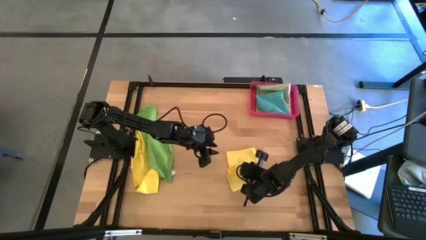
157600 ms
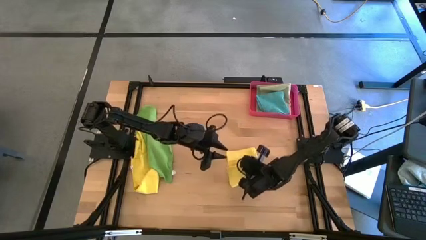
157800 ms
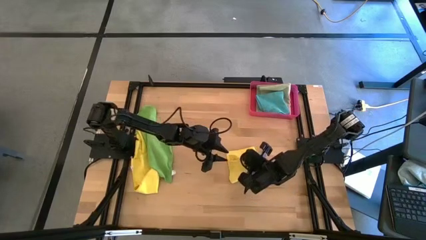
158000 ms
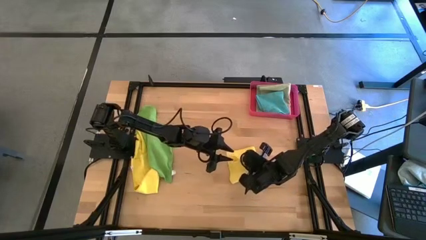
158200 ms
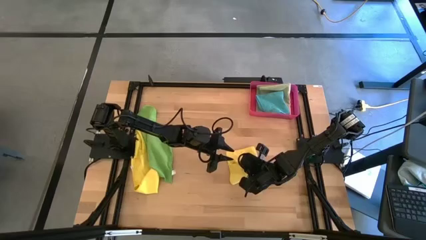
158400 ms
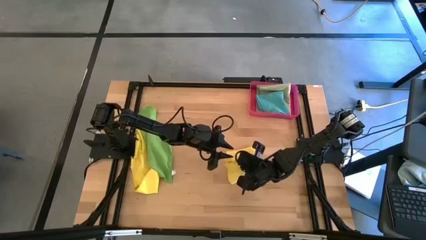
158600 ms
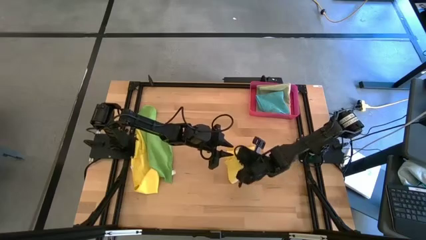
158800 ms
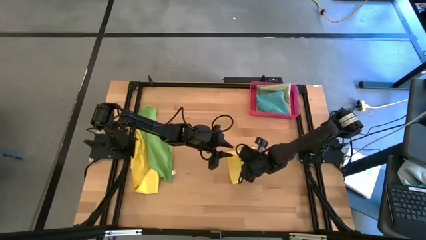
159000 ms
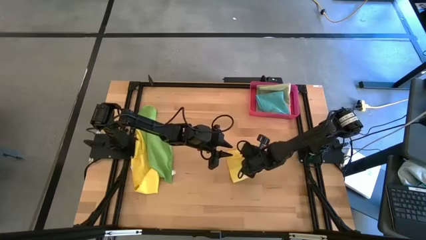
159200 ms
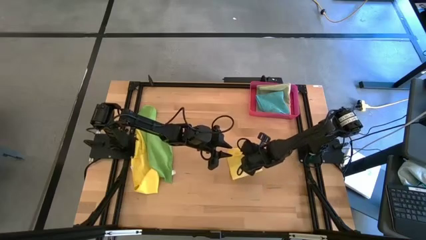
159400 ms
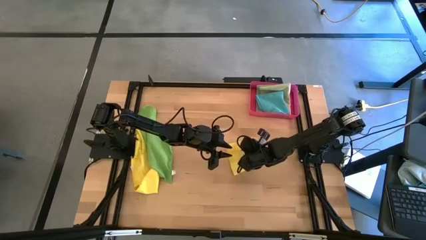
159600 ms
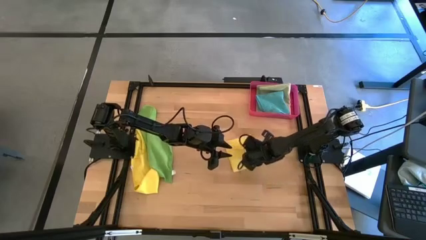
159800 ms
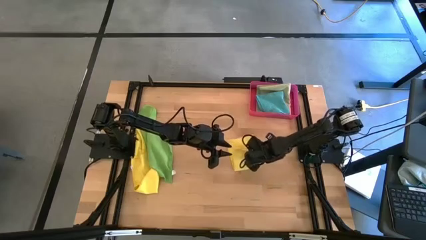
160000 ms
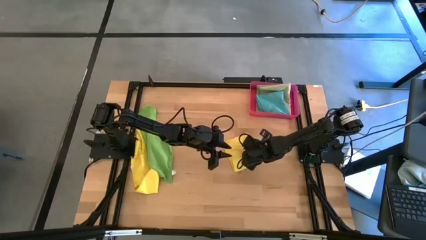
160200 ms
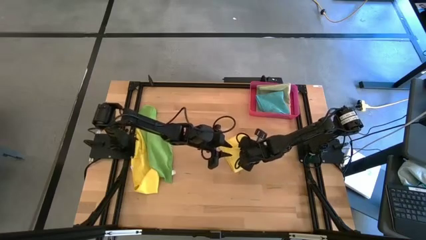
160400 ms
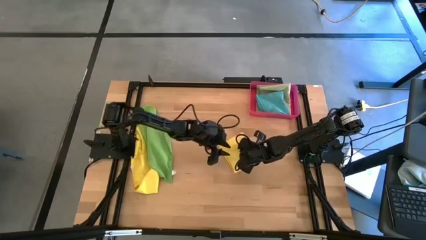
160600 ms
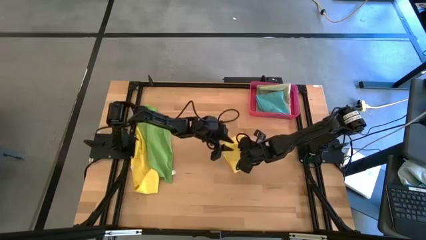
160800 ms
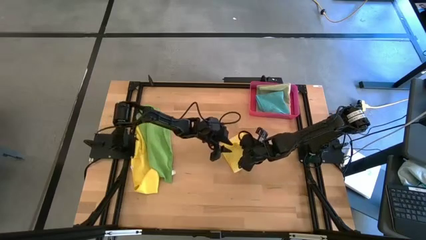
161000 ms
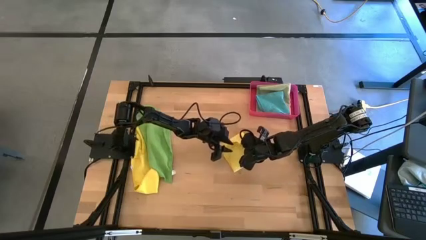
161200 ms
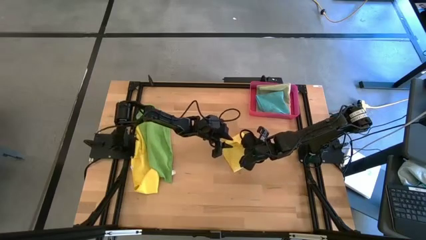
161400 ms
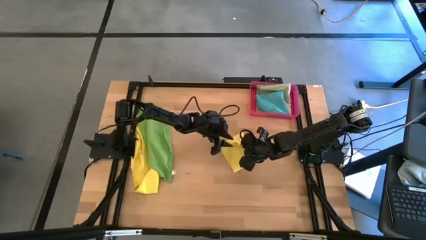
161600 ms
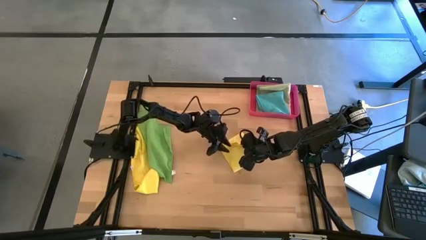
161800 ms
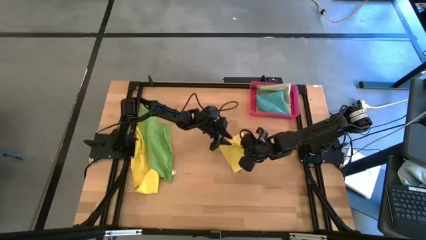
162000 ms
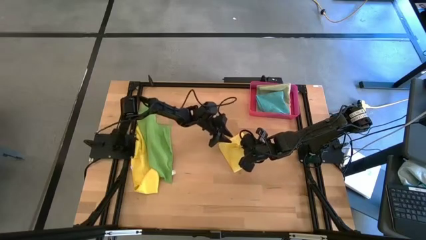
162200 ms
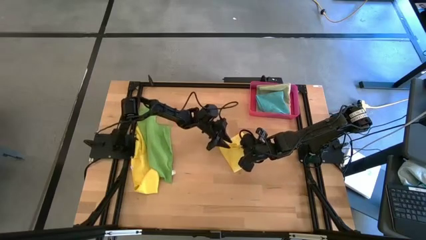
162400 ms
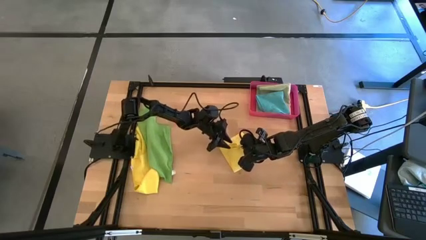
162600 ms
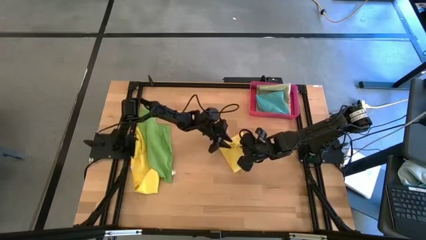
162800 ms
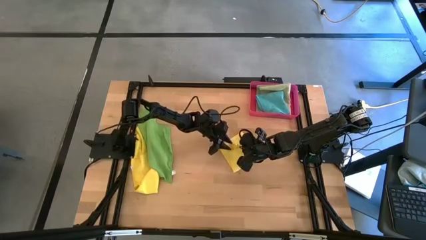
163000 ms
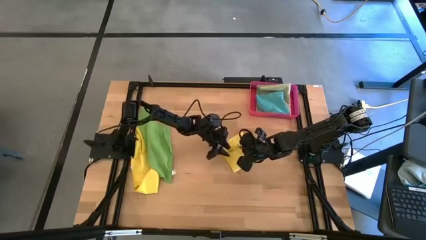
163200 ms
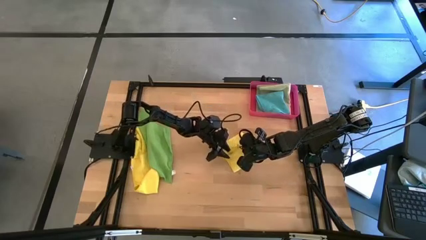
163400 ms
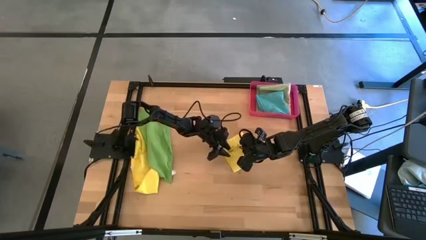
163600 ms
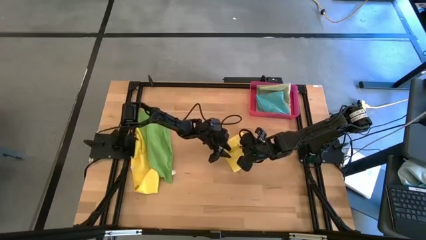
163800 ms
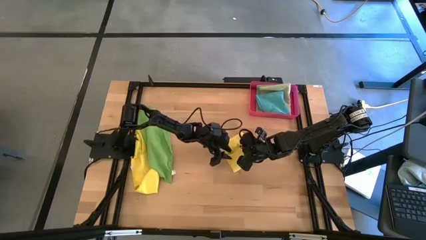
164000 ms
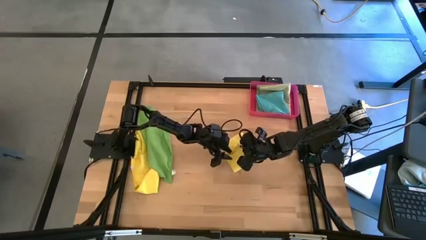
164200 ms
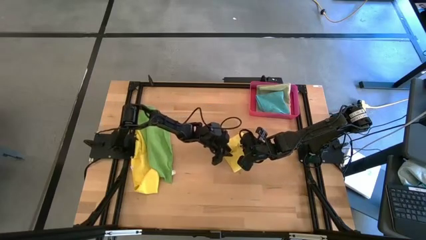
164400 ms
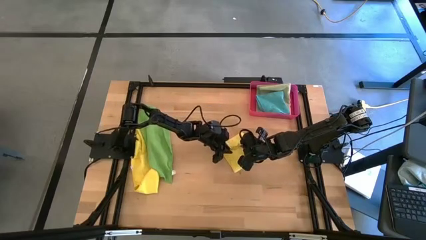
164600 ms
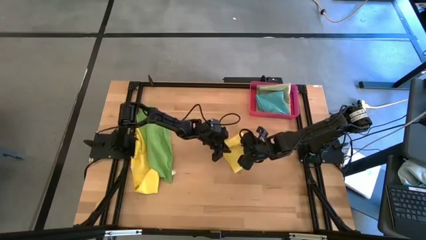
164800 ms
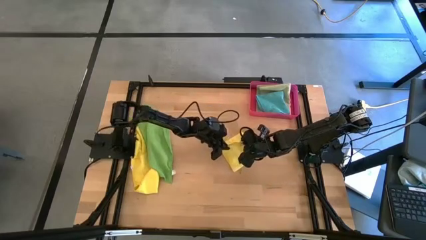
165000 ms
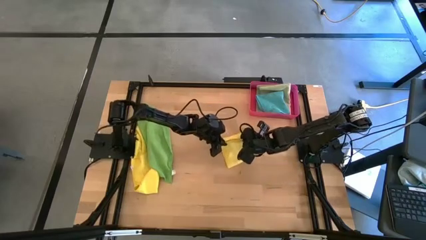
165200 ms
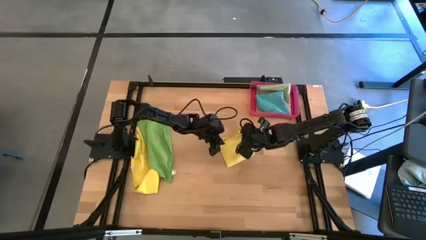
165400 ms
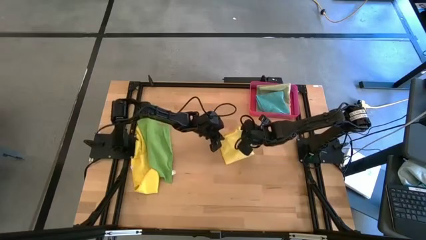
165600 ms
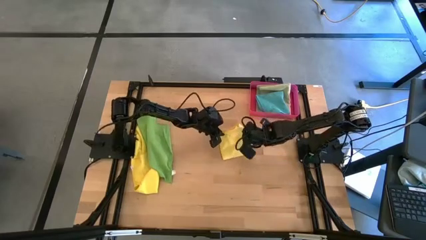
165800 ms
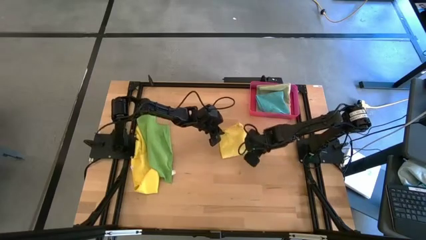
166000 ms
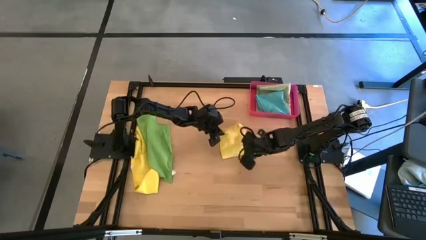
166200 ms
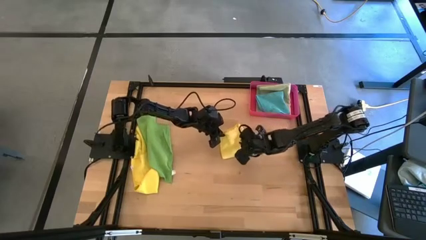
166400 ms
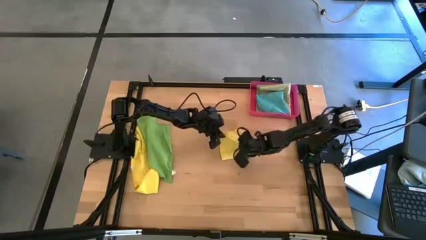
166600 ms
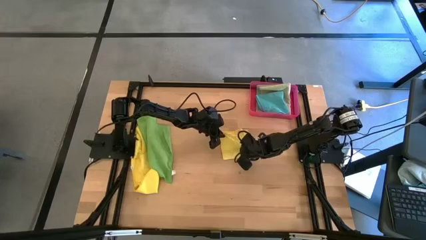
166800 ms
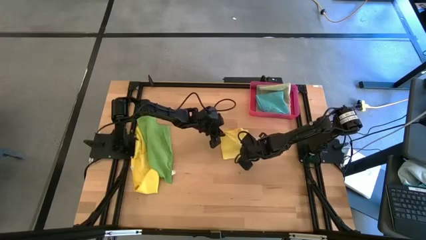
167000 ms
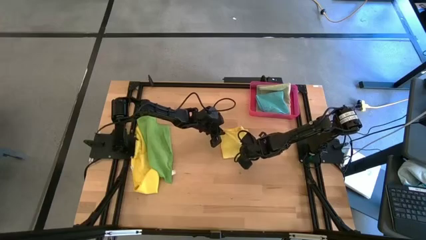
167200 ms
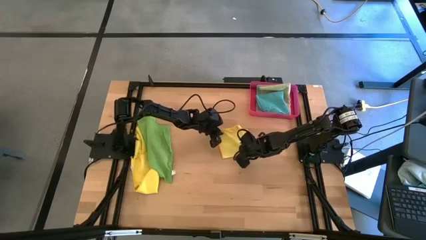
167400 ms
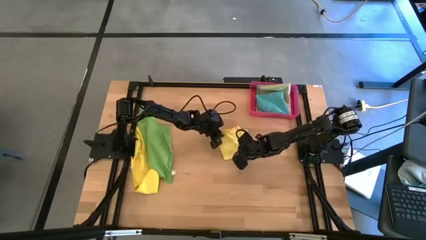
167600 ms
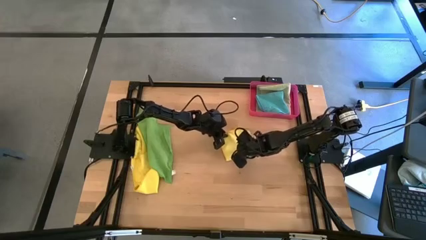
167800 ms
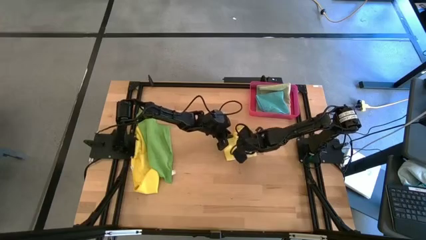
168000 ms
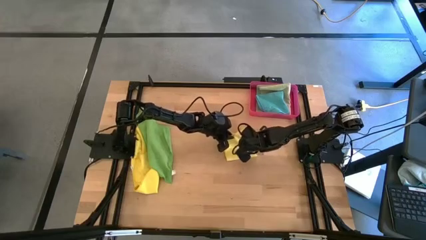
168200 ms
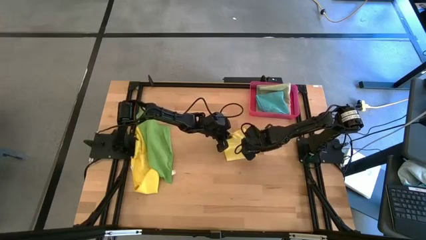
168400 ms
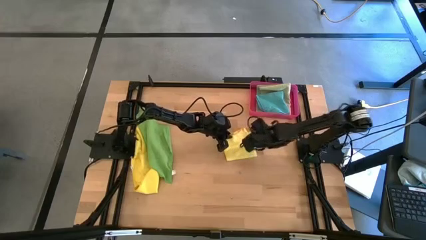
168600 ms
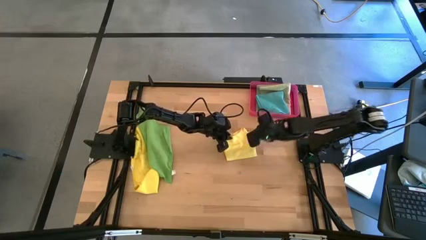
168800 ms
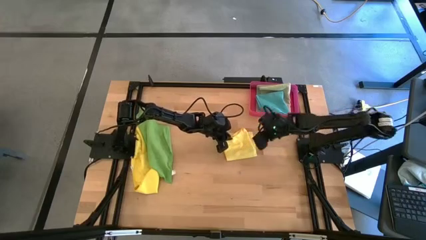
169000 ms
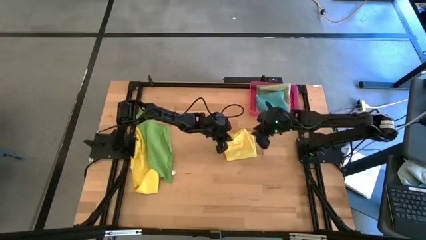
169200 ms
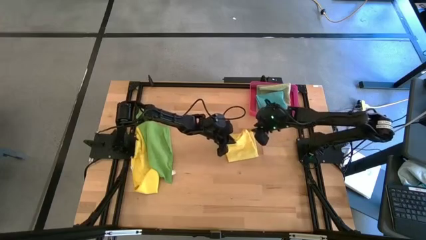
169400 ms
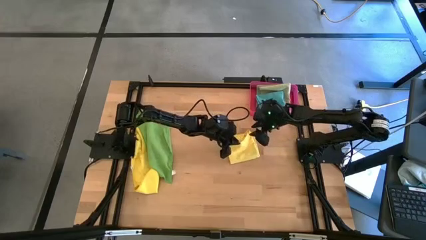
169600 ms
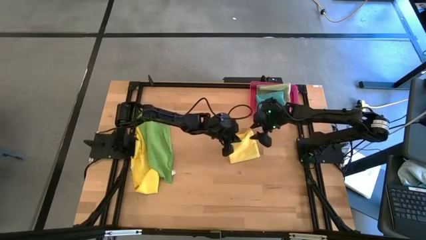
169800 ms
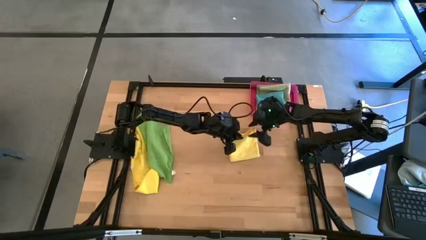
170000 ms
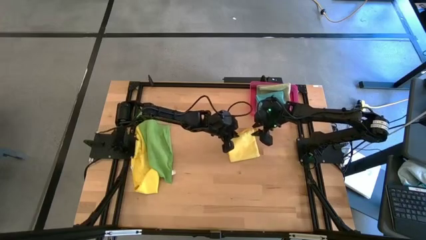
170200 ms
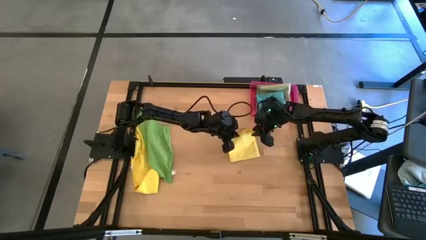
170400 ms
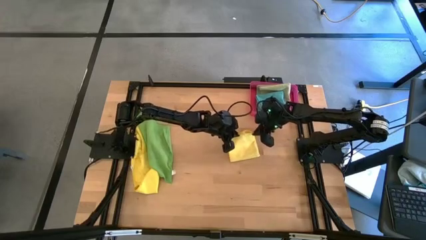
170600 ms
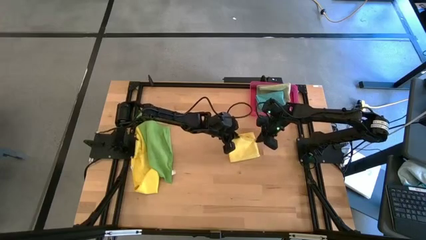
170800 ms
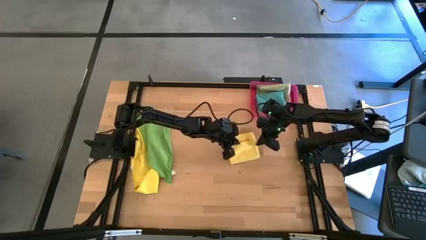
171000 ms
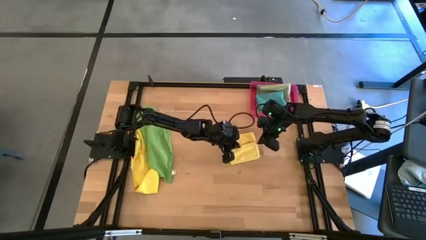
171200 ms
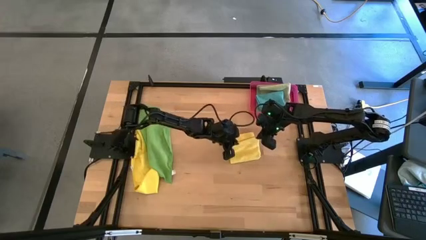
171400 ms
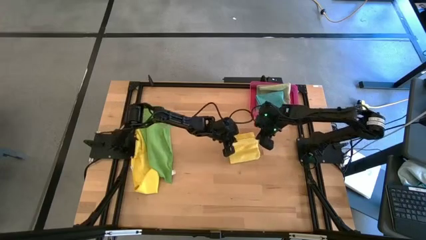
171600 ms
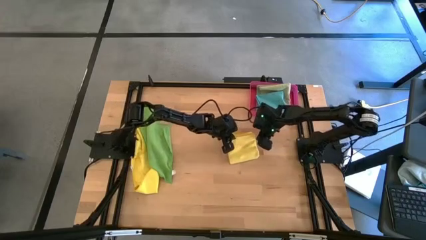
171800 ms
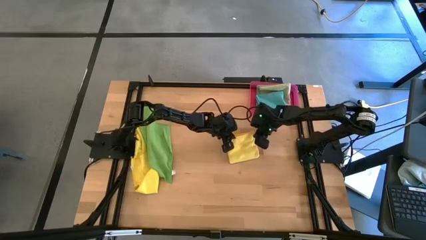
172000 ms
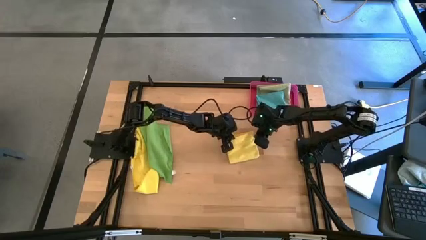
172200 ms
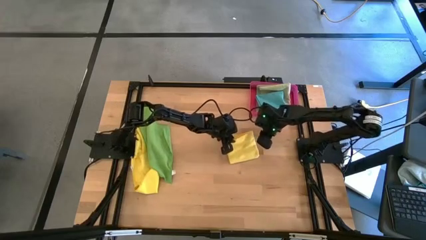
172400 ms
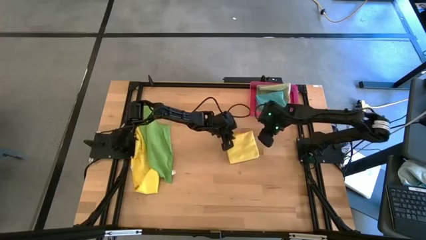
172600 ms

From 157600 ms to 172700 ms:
Task: Fold microfiber towels
Fold the right yellow towel

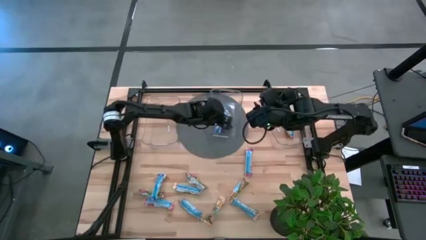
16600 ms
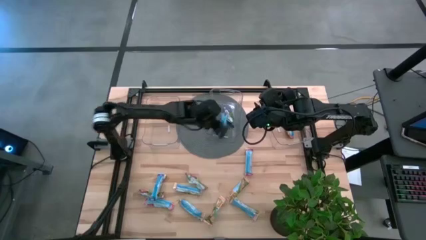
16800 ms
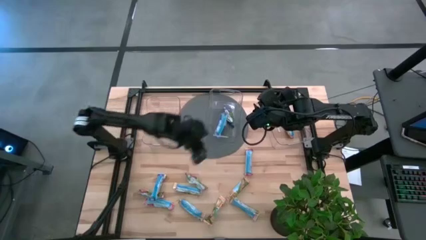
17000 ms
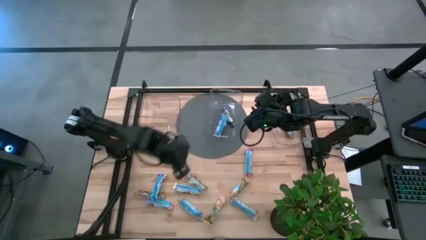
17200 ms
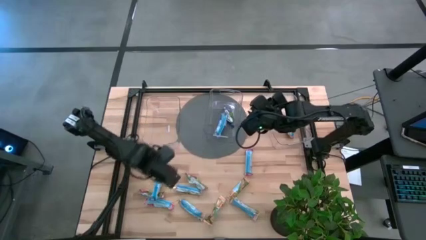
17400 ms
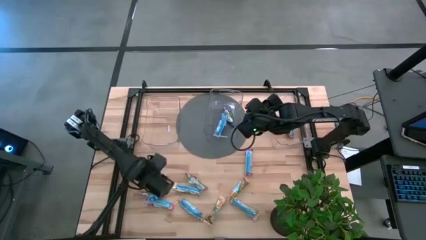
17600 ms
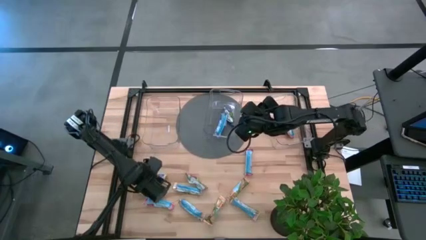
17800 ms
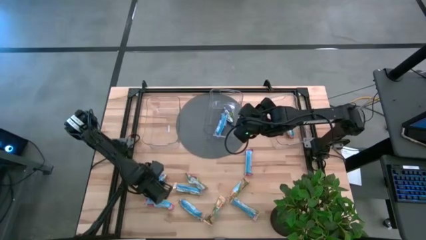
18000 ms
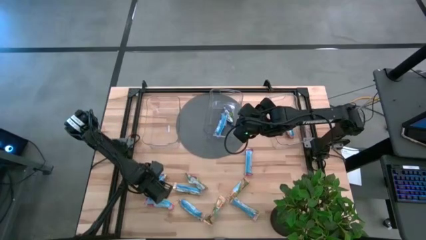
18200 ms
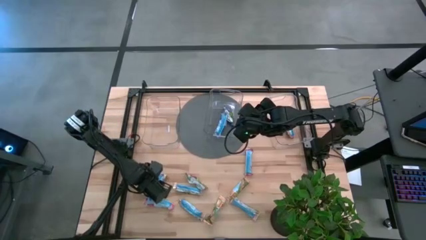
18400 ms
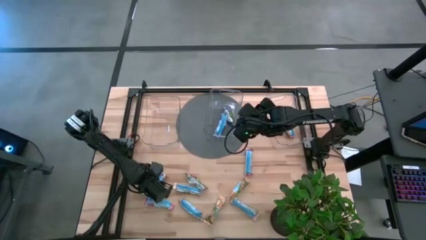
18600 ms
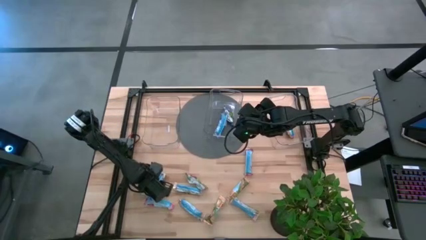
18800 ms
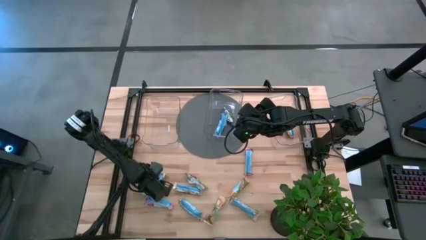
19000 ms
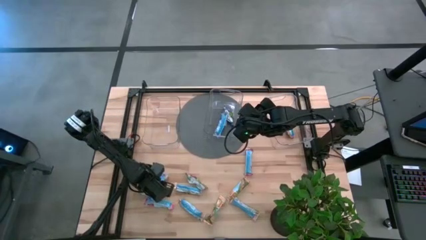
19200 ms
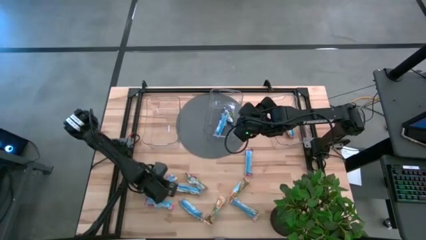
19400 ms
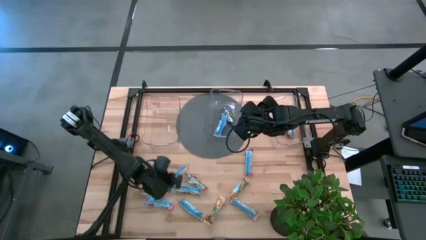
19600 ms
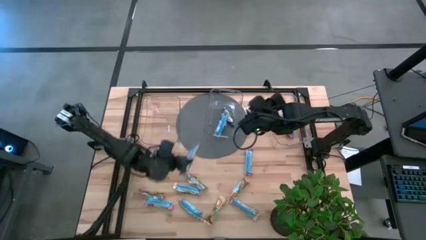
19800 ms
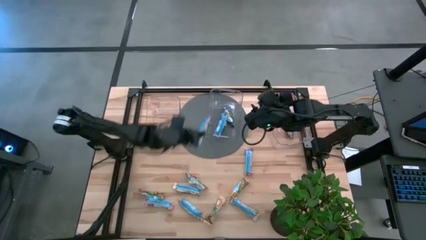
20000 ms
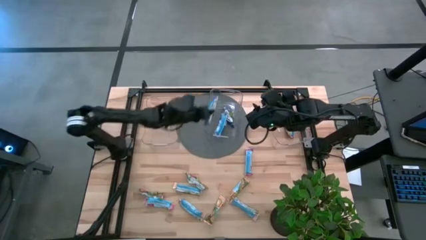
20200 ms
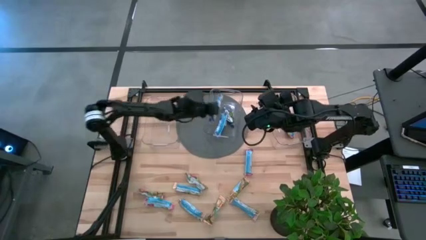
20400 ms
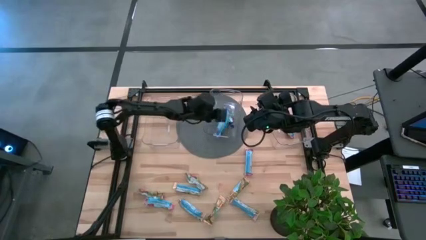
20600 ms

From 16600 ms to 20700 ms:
Task: Pick and place Granola Bars by type
Put the blue granola bar into the middle transparent bin
